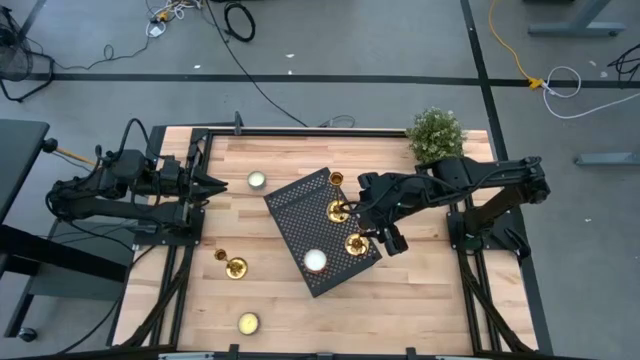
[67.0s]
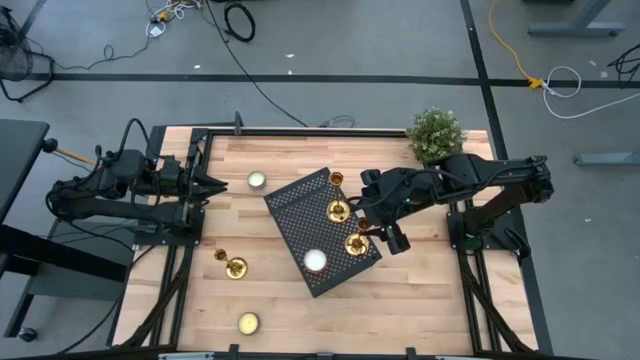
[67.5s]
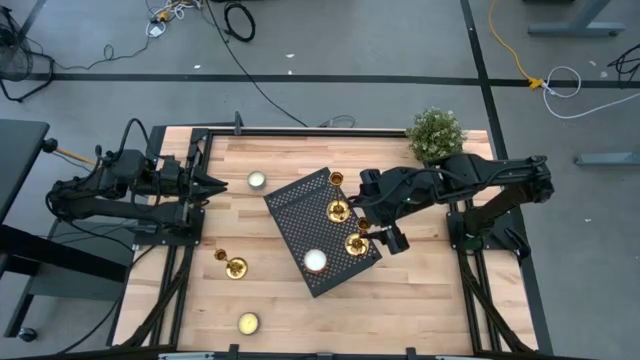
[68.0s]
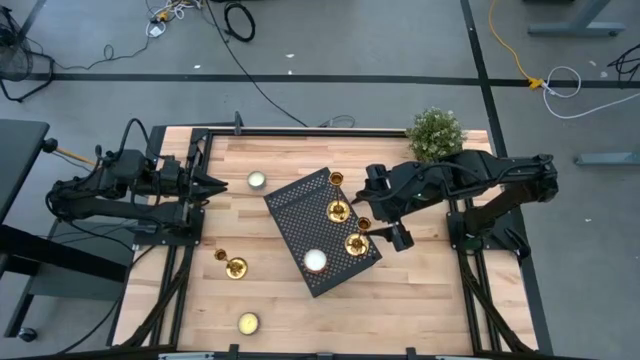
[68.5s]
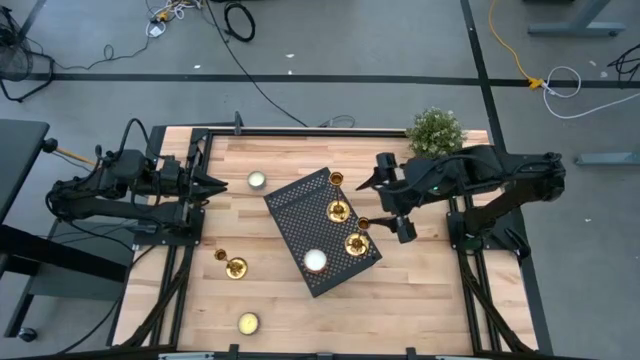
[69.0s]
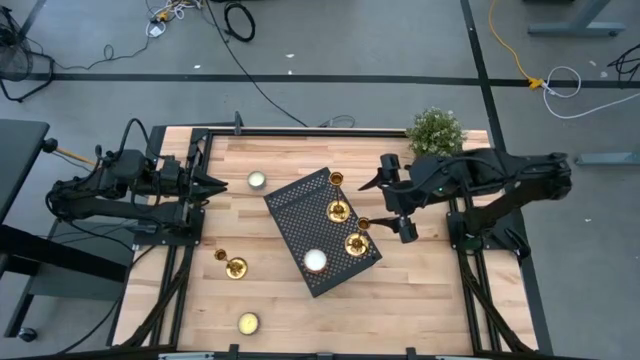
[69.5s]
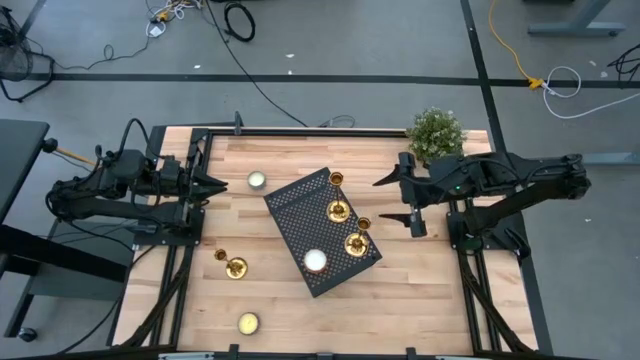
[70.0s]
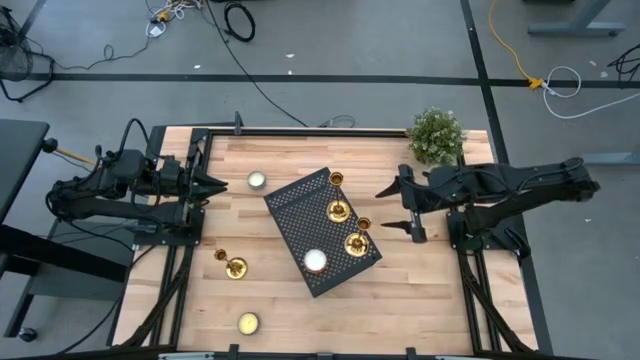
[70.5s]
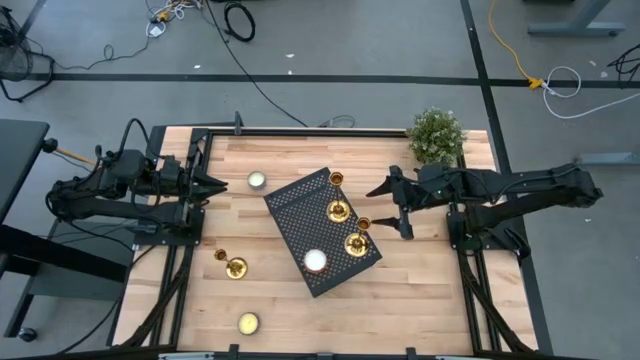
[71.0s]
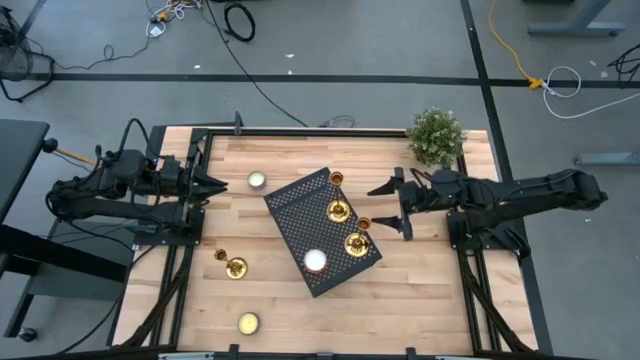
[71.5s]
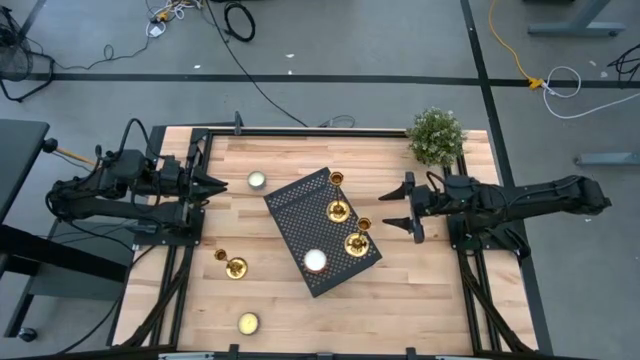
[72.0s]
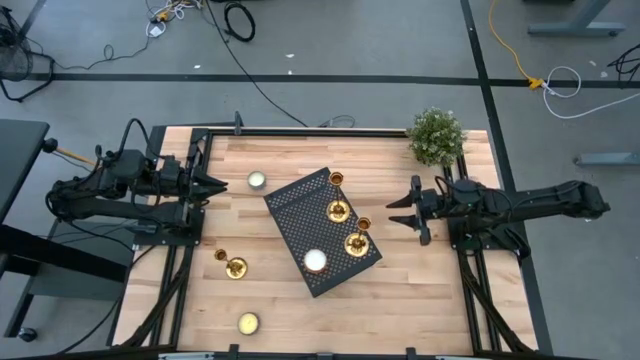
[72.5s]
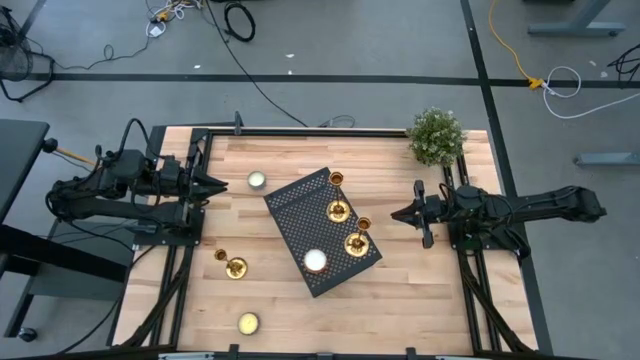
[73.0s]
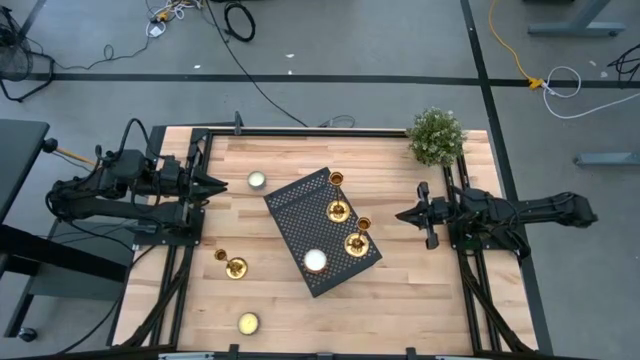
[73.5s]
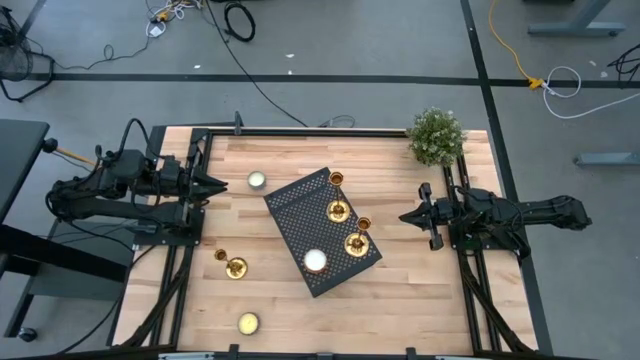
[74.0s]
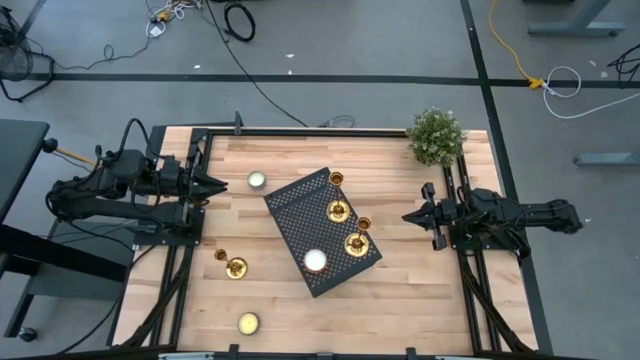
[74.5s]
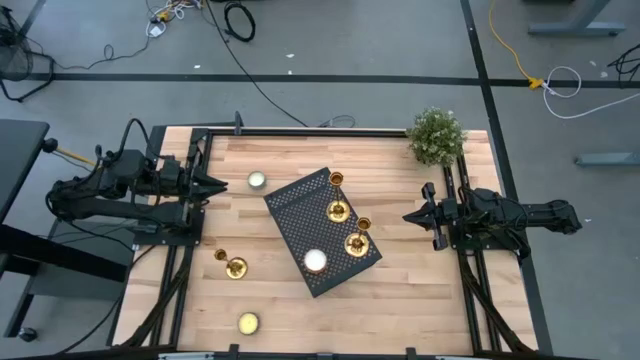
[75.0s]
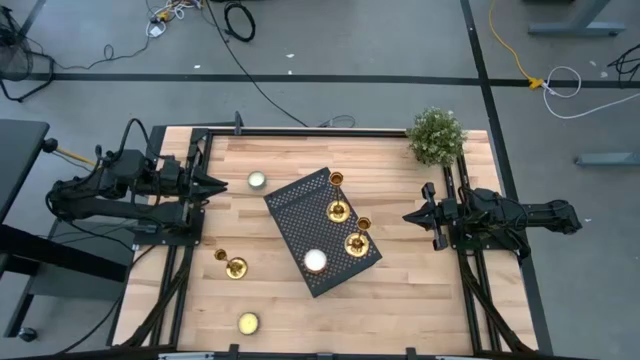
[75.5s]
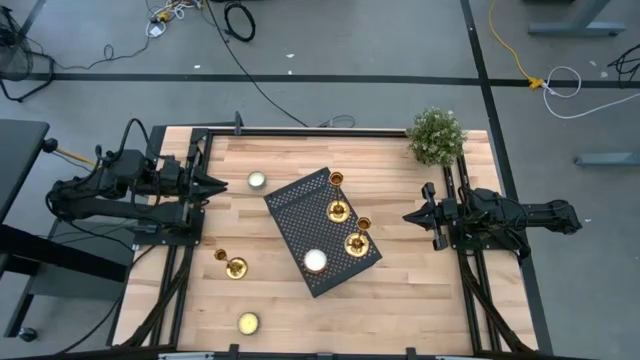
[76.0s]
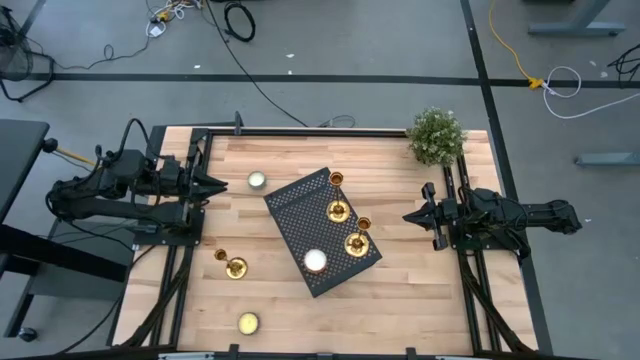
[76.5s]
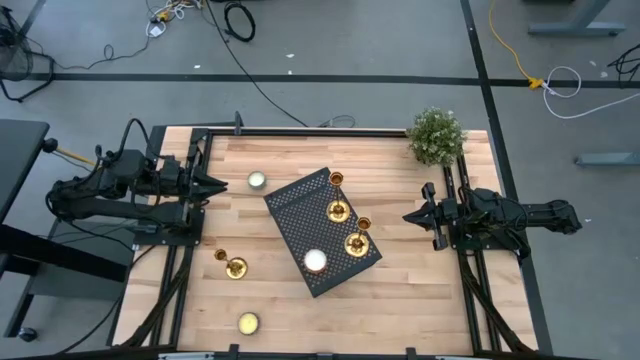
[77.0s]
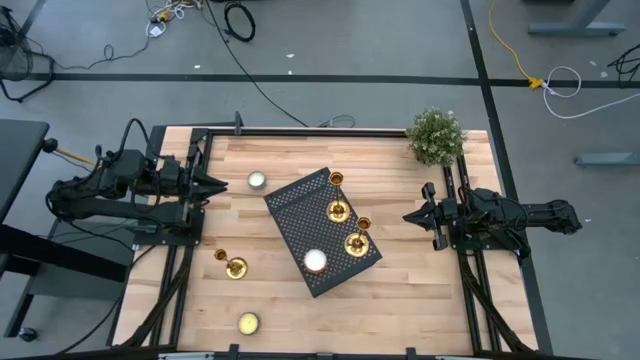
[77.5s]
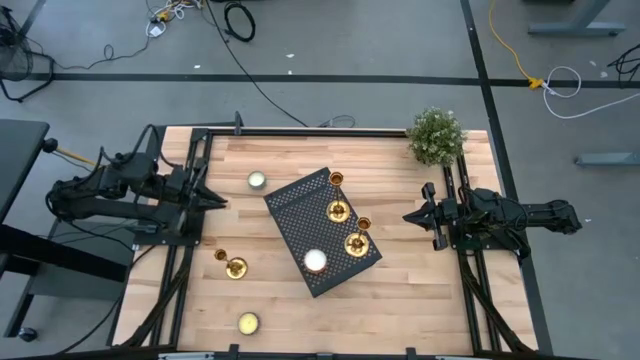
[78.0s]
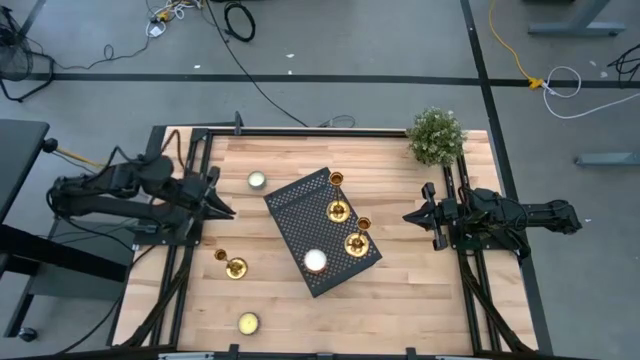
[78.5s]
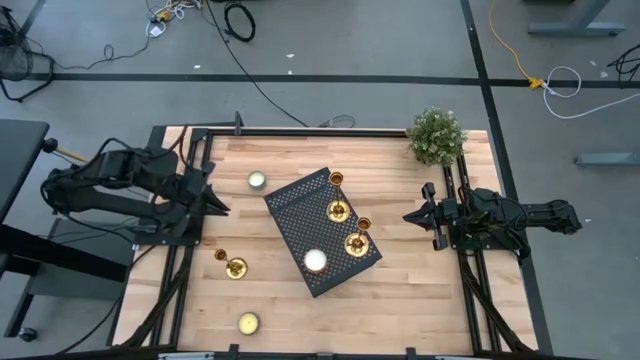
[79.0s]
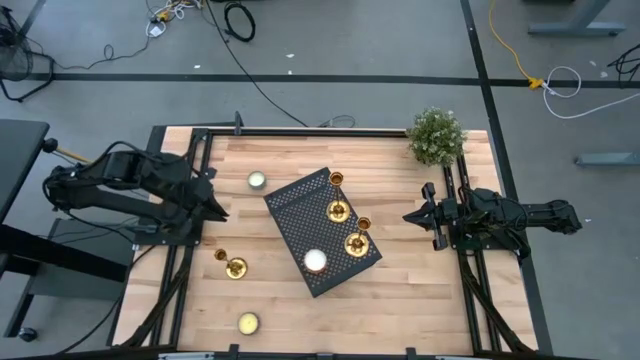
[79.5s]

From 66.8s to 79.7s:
Task: Pick & Place candle stick holders
Put the gold candle holder on the shelf aligned with the other candle holders

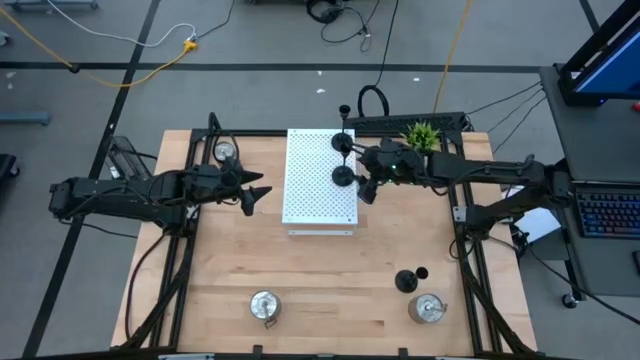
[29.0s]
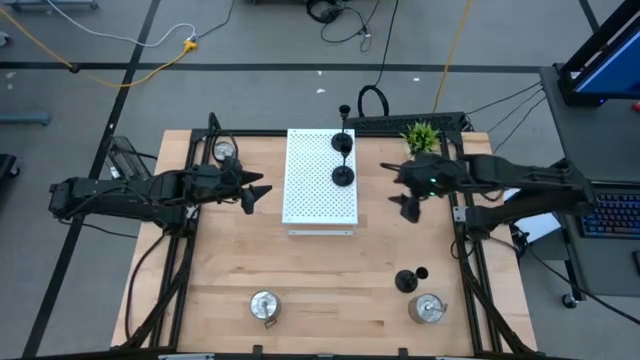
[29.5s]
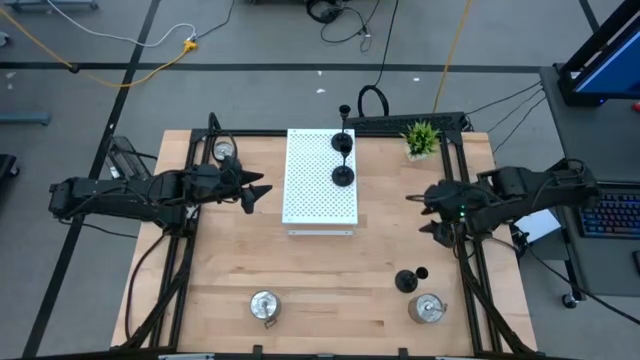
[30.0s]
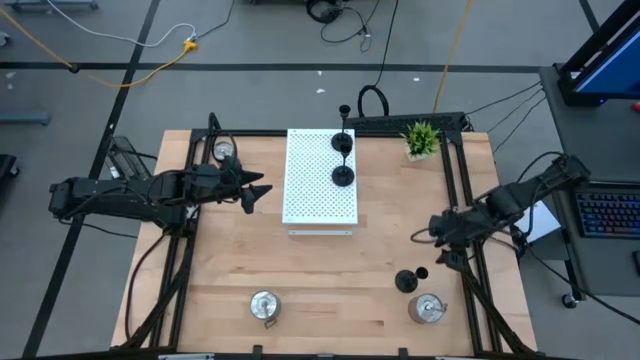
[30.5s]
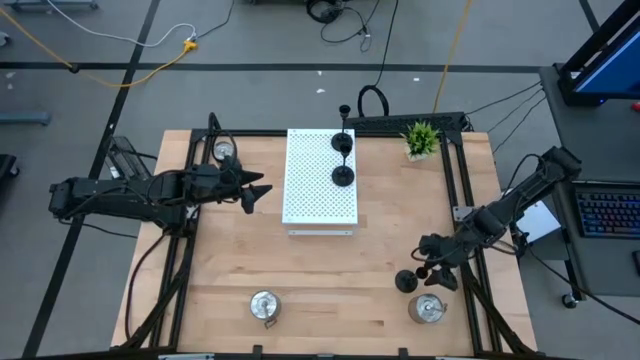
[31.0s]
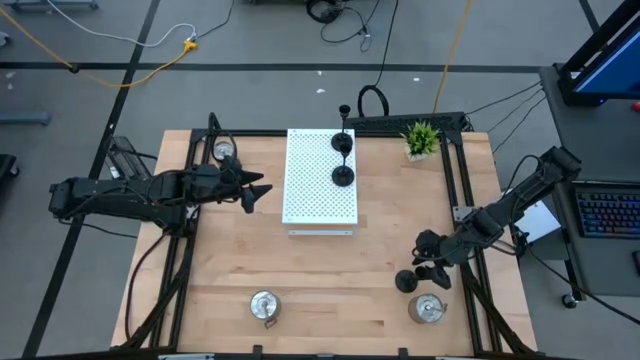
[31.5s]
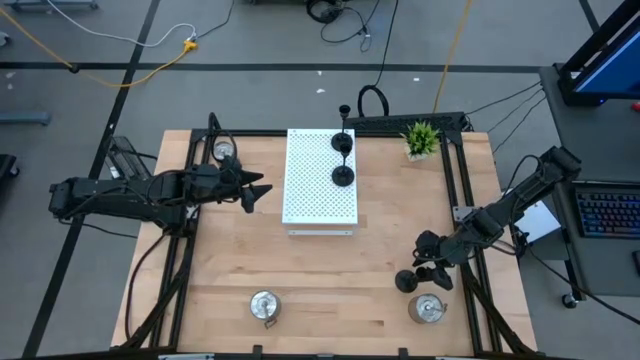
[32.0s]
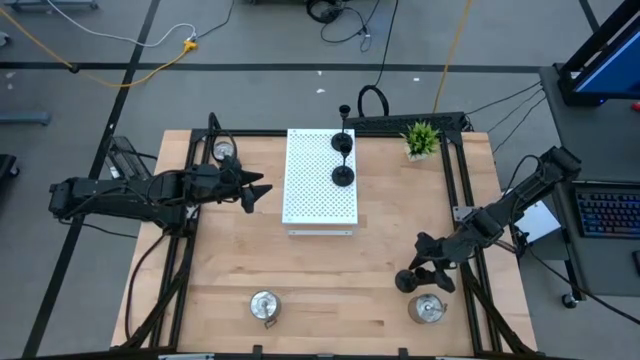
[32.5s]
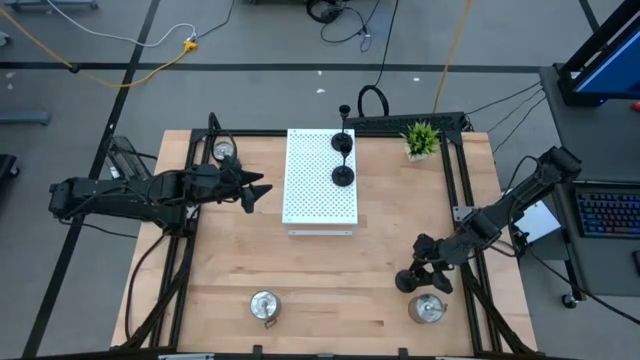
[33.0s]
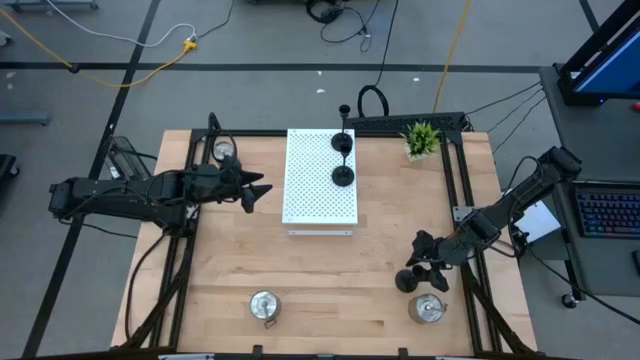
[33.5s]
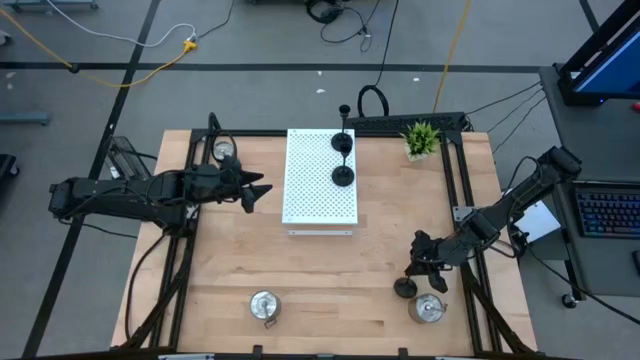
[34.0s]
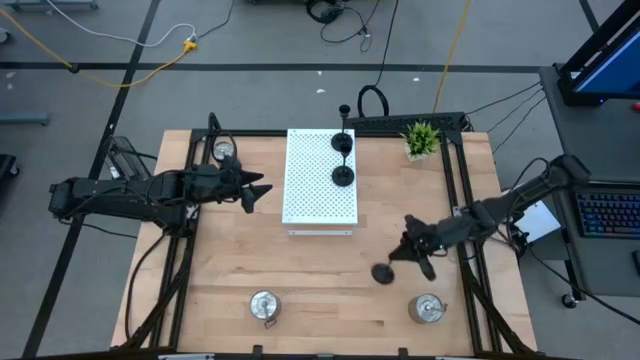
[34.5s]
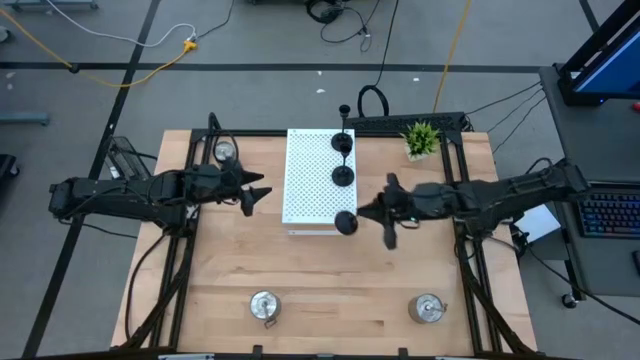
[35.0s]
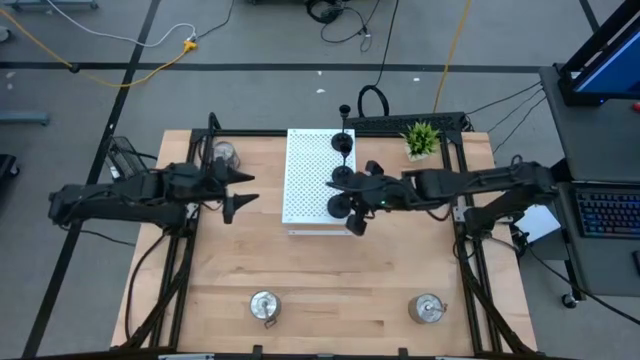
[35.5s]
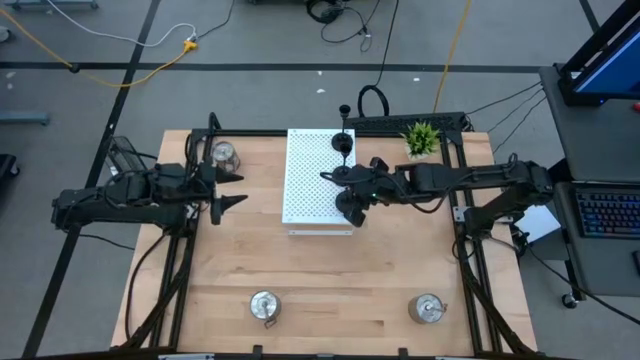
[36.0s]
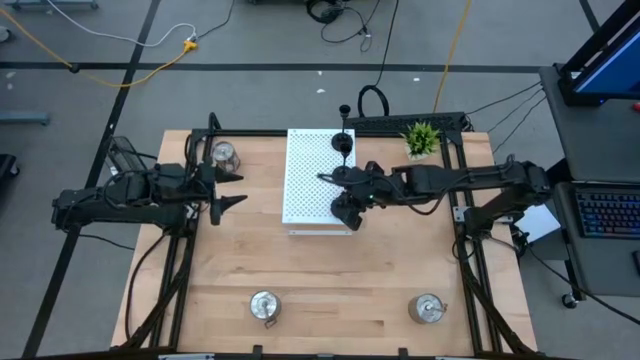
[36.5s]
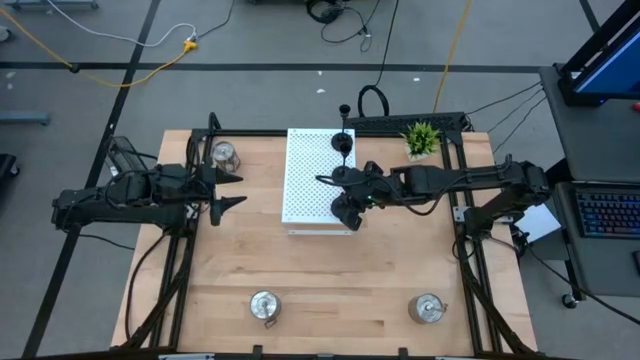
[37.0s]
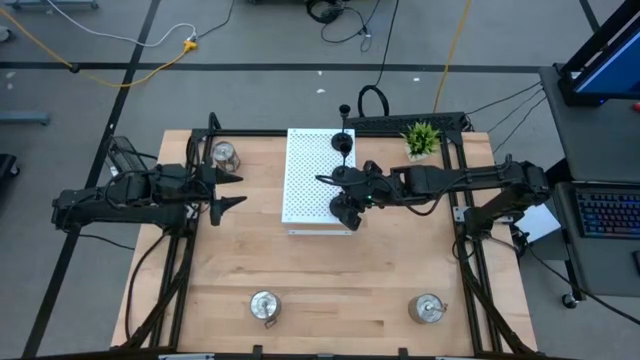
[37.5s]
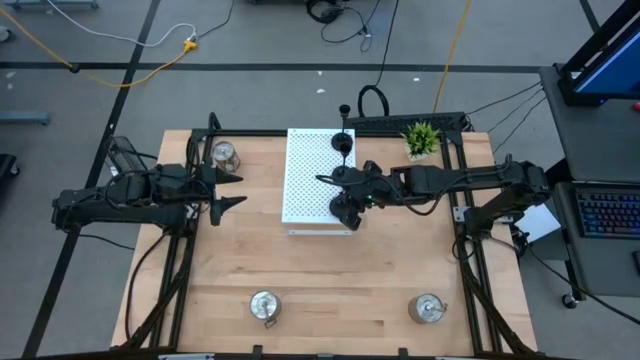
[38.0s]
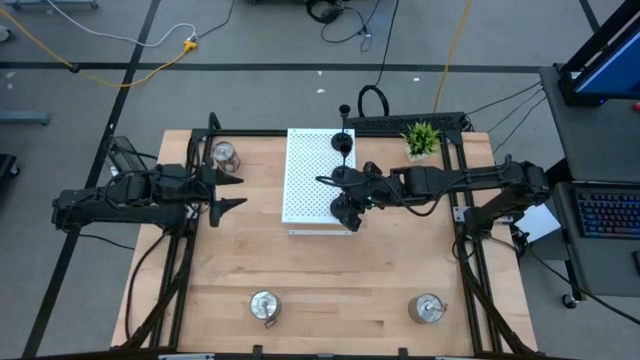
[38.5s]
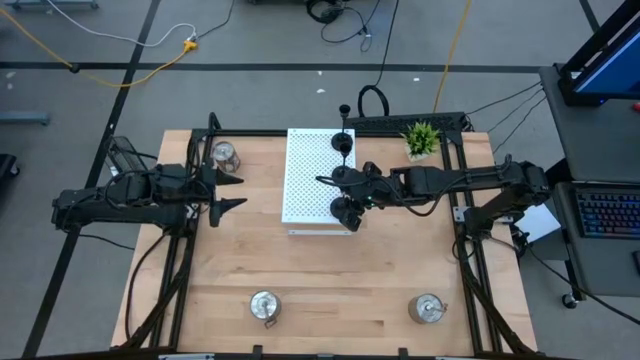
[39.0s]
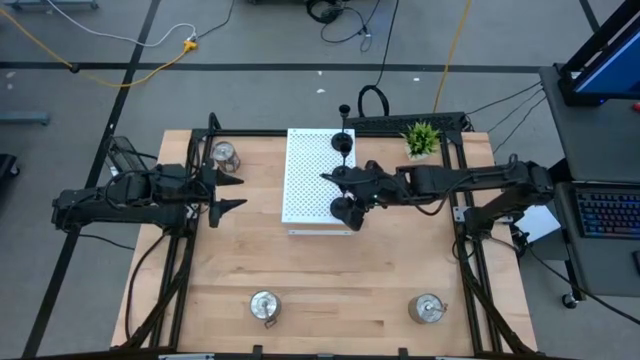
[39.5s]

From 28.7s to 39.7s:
Task: Pick & Place candle stick holders
Put the black candle holder on the shelf aligned with the other black candle holders
